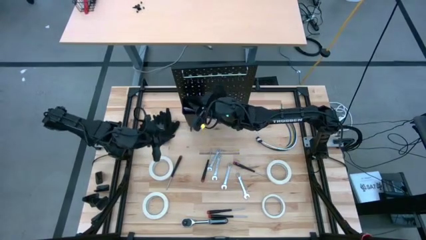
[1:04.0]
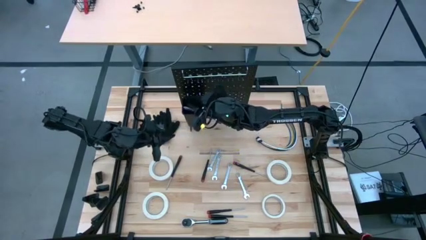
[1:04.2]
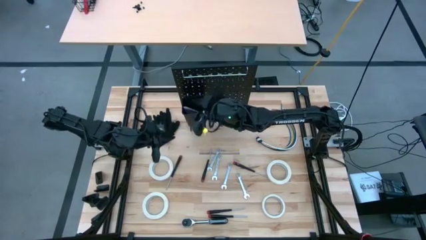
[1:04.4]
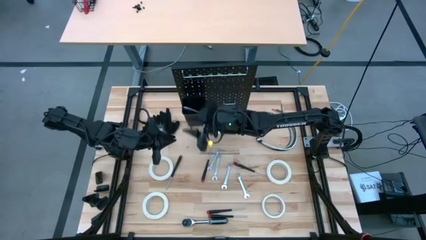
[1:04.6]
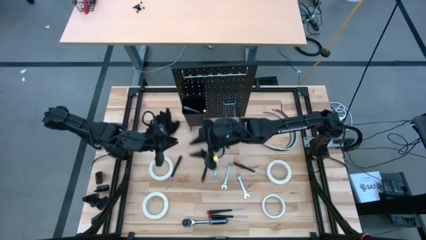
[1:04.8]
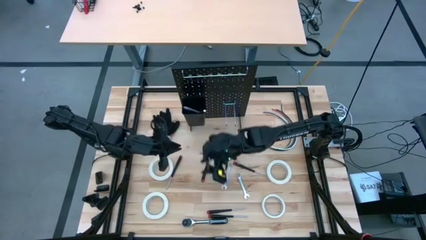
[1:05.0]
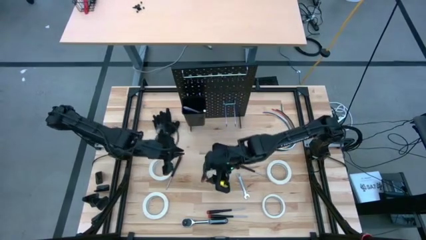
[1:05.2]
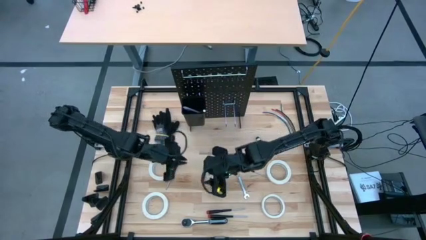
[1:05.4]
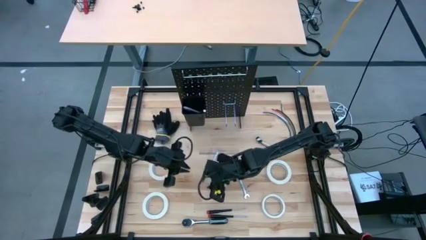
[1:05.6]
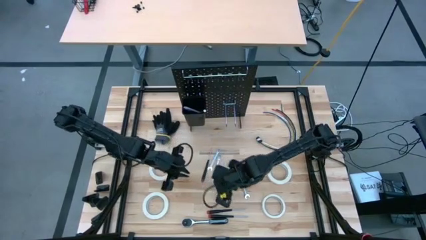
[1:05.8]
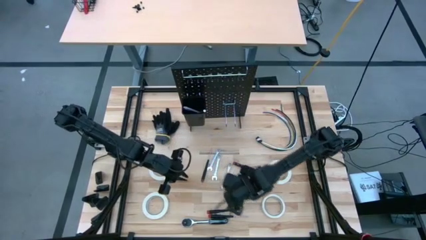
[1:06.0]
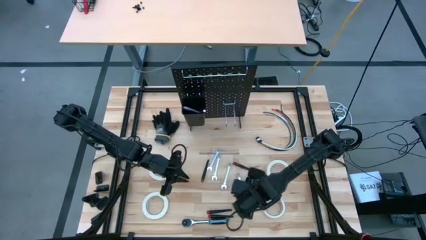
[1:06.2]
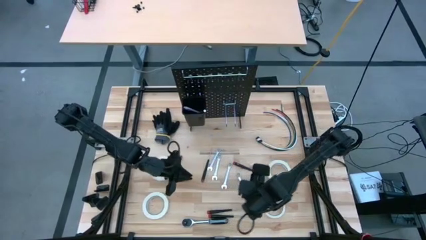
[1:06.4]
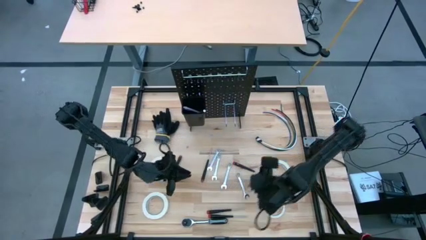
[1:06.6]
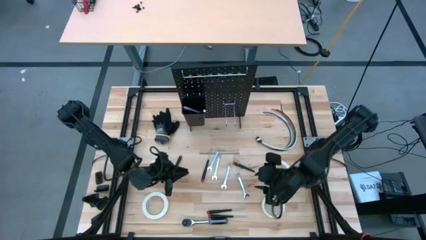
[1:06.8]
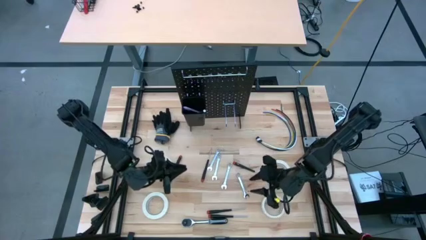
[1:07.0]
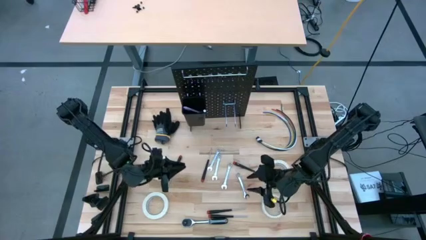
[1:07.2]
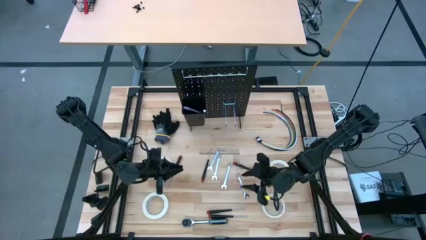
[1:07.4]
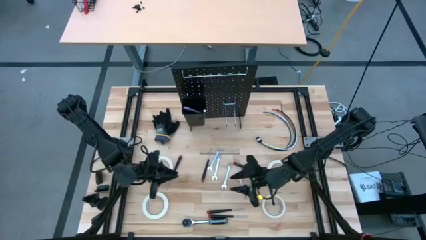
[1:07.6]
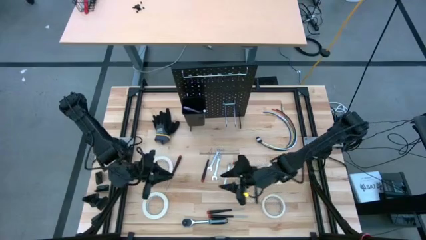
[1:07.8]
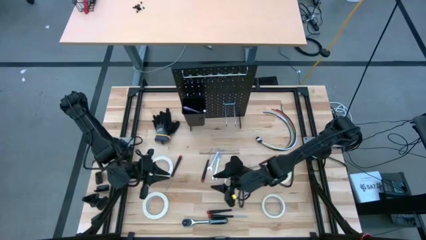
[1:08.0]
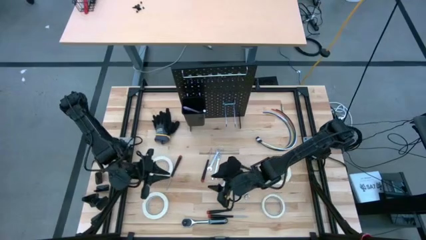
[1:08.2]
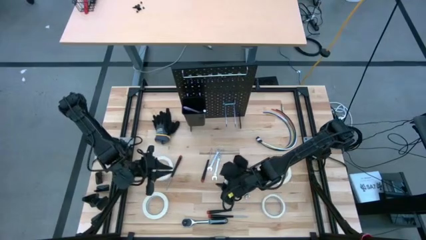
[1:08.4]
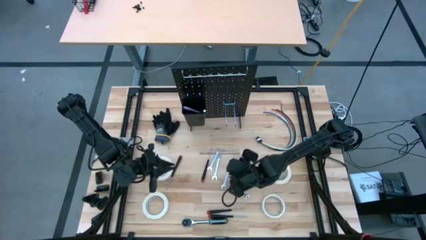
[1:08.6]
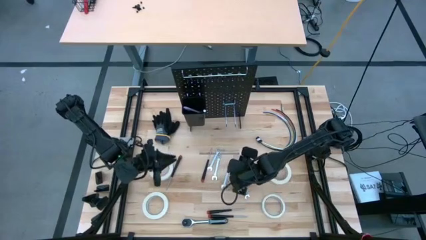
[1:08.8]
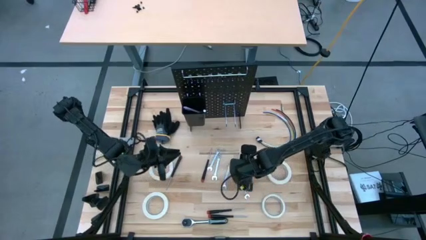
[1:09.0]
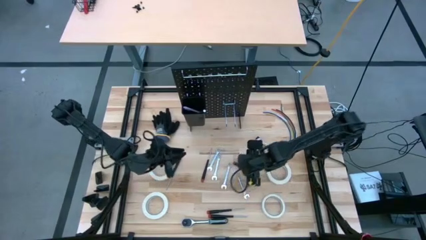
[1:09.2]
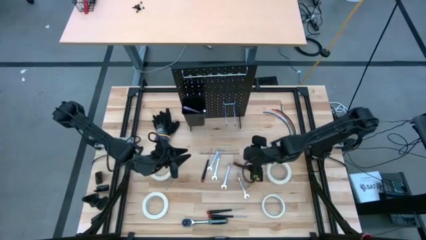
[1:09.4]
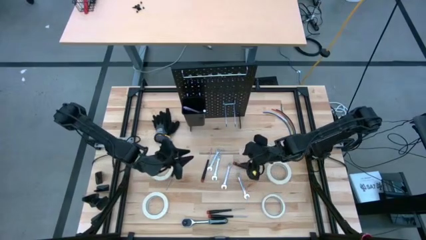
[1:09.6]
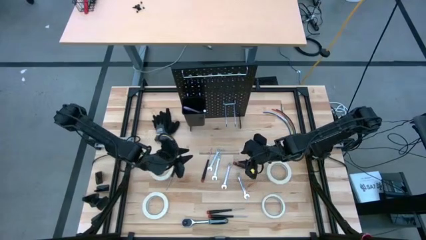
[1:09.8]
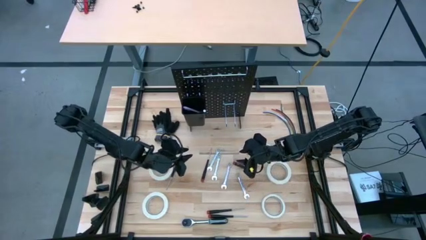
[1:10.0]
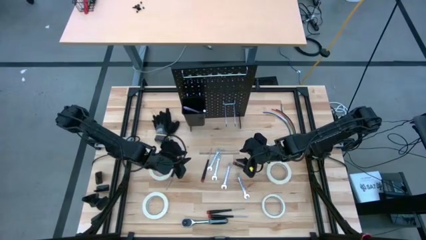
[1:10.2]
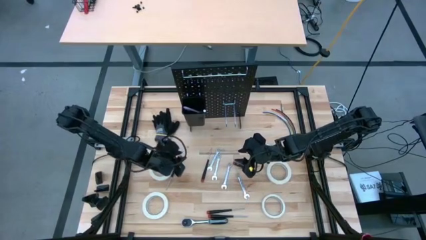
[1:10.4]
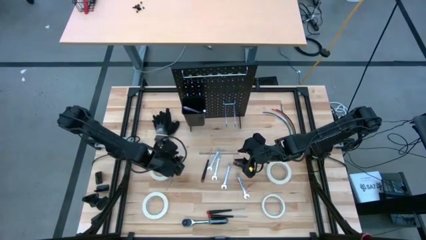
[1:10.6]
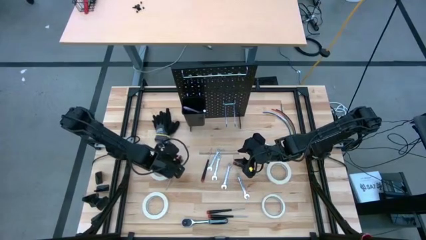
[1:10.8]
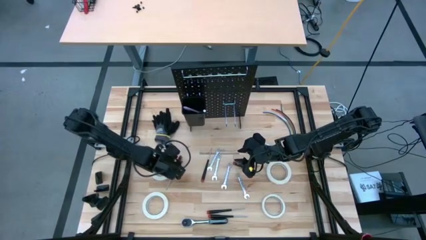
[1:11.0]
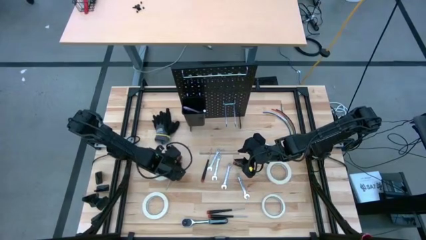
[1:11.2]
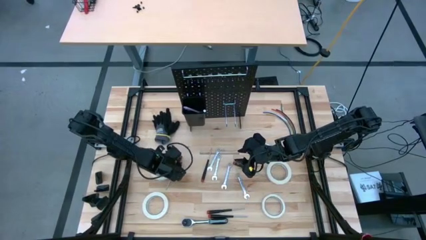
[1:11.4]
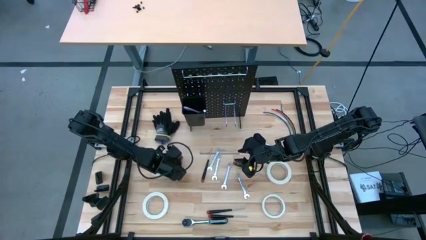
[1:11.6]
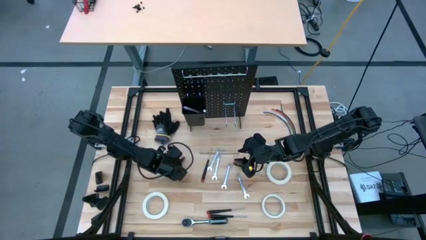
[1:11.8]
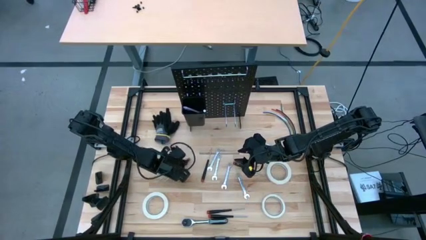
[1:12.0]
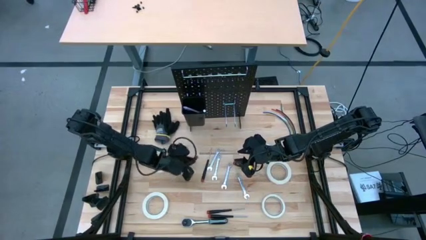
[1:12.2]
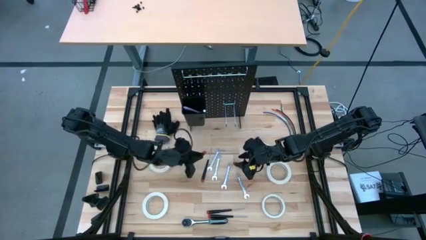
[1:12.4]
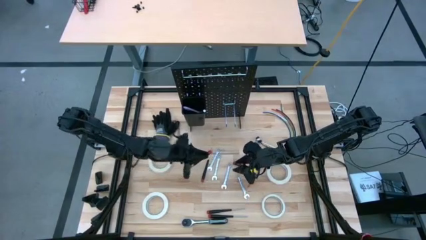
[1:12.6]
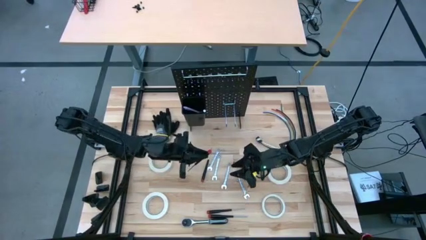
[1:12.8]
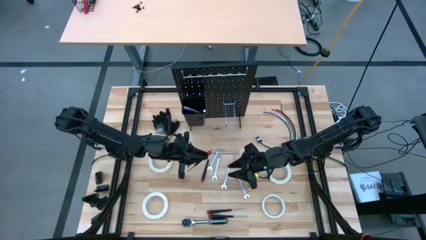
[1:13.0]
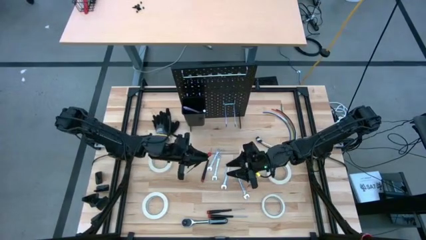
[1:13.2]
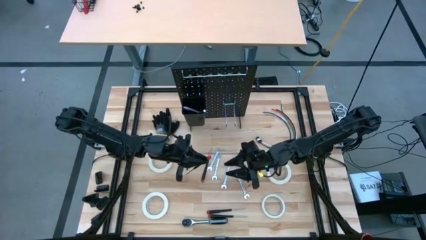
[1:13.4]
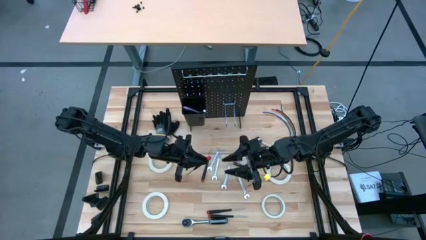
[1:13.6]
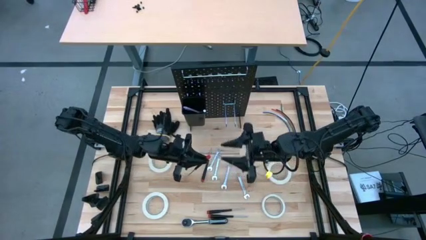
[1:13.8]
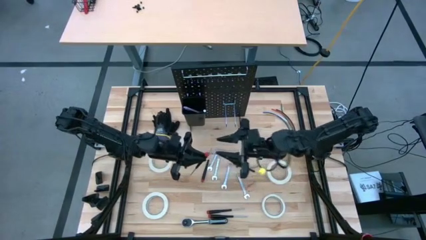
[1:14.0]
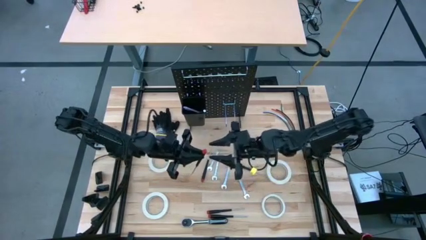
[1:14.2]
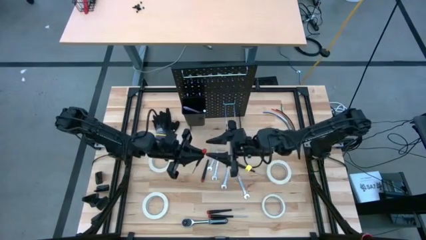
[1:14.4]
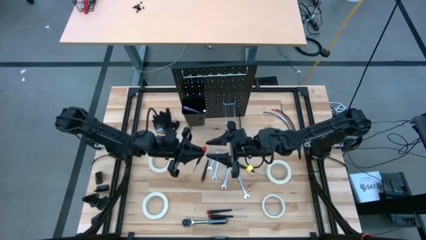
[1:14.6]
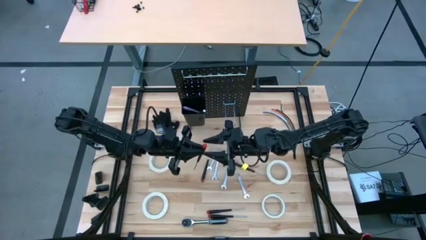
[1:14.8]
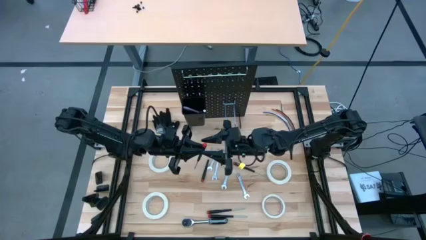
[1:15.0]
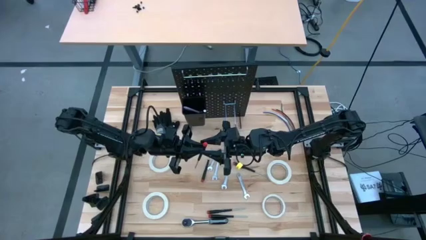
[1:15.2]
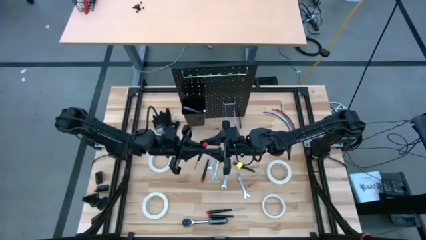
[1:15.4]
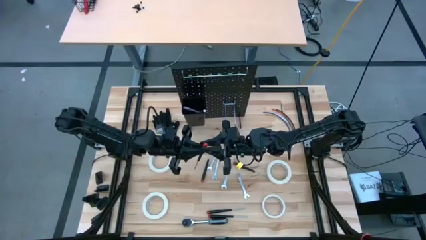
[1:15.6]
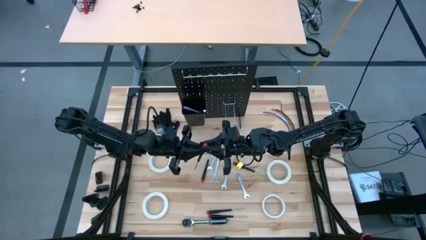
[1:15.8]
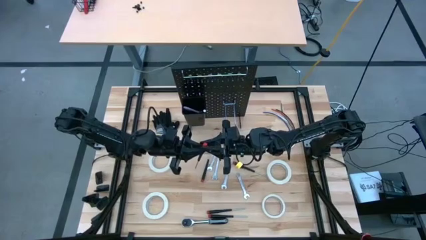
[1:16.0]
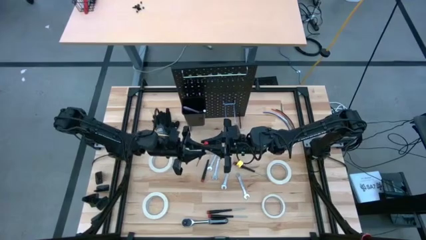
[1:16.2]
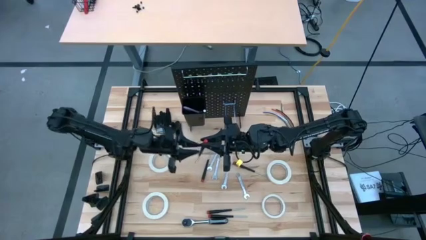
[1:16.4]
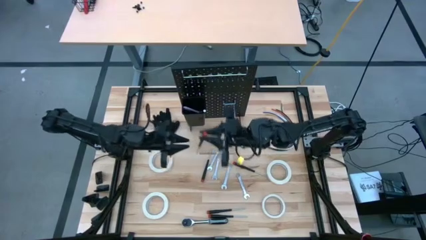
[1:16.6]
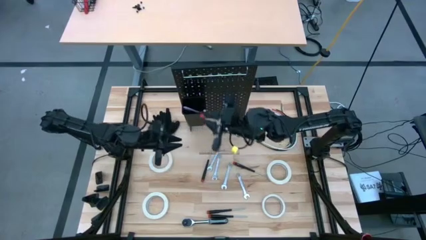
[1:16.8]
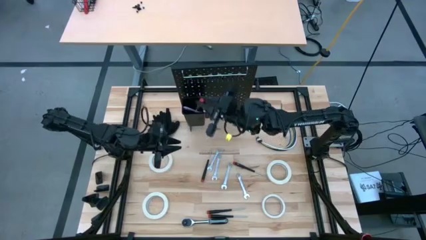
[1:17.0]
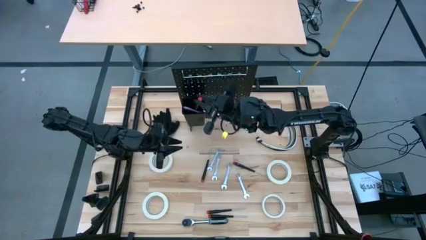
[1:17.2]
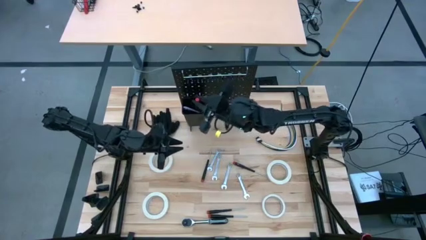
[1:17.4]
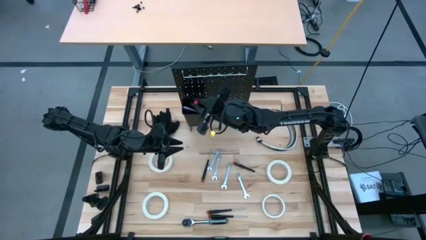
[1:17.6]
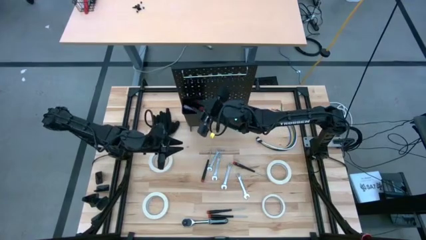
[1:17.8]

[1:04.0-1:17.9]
Task: Hang tools onto peg board
Put the nut driver into the black bin on the peg board
